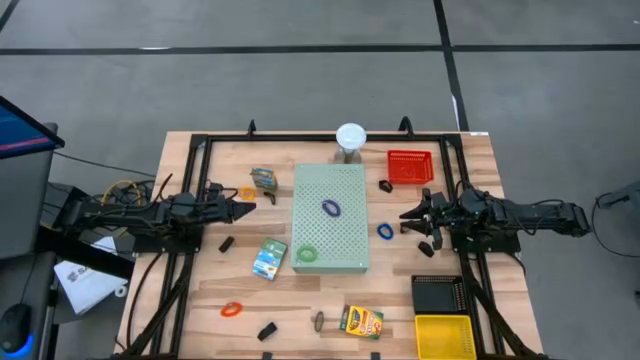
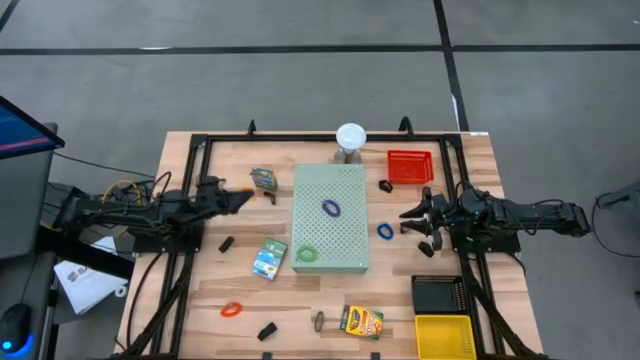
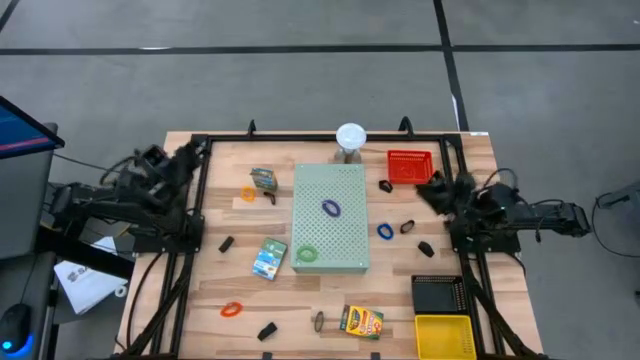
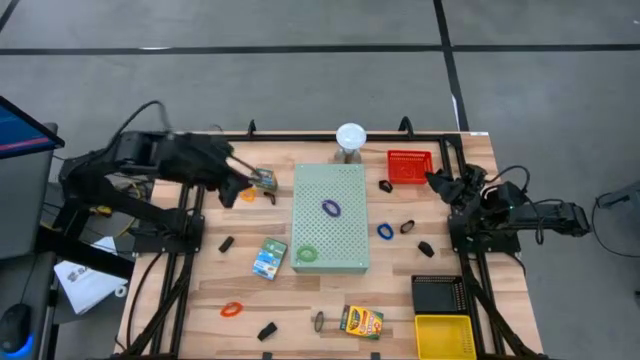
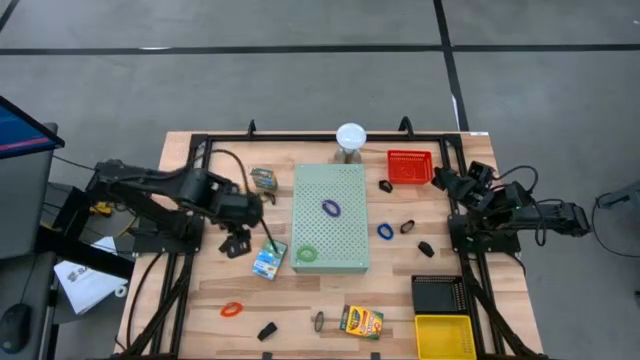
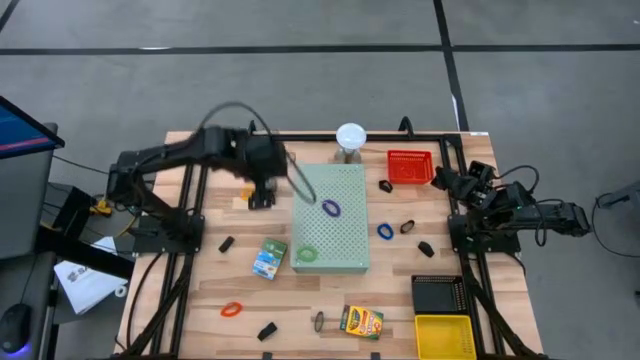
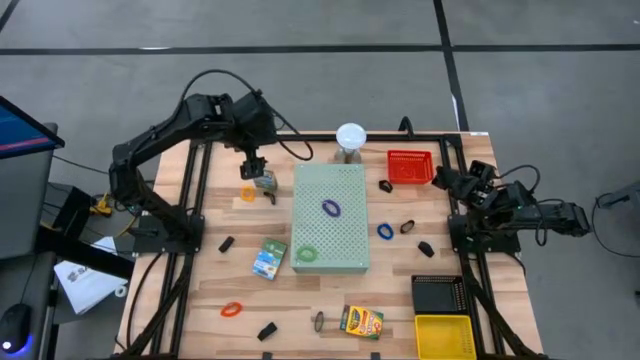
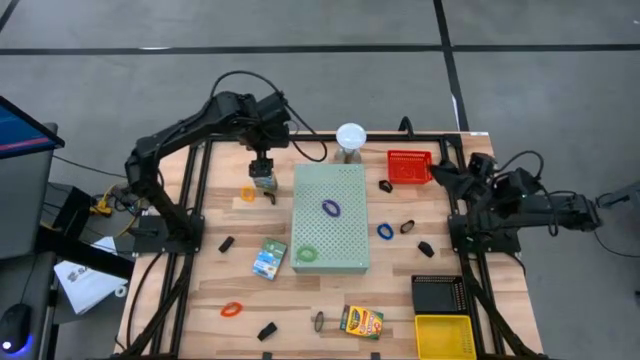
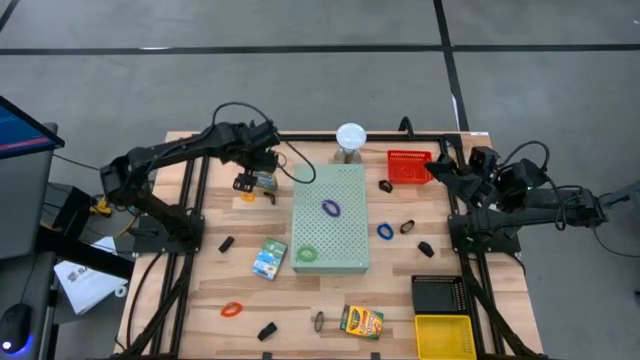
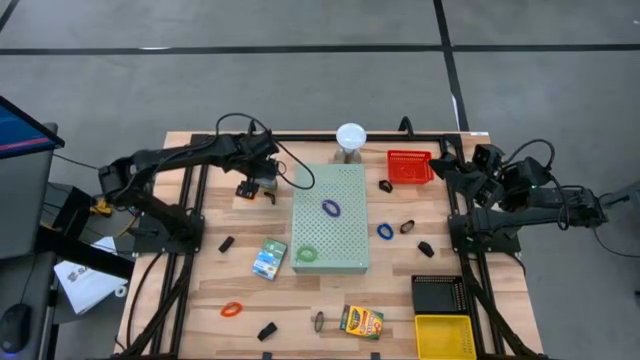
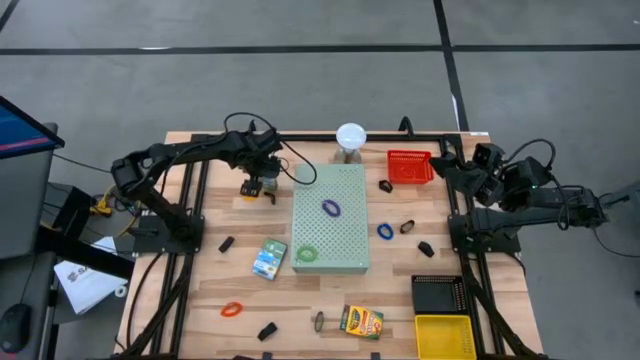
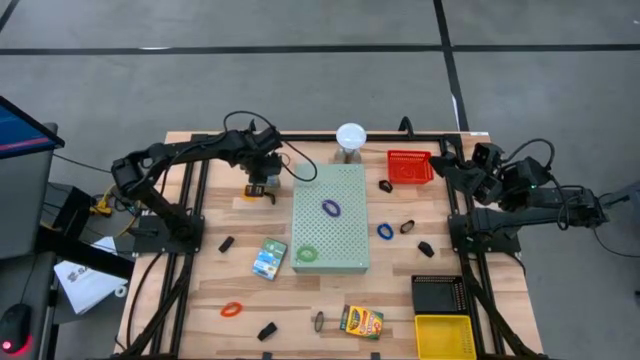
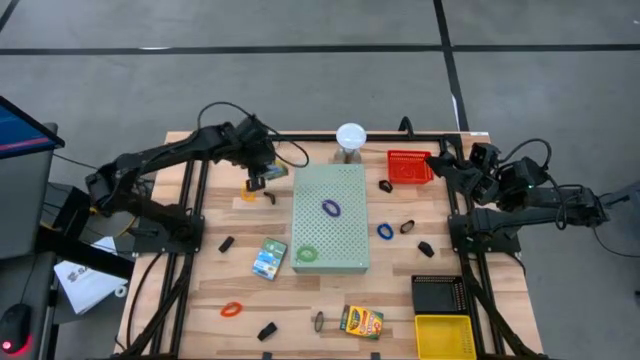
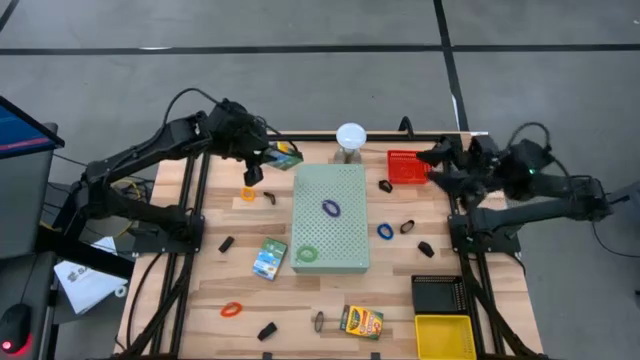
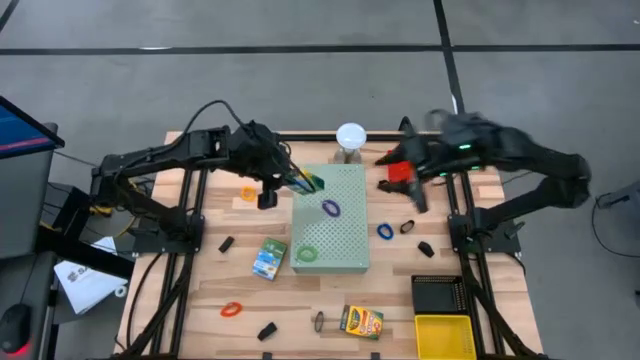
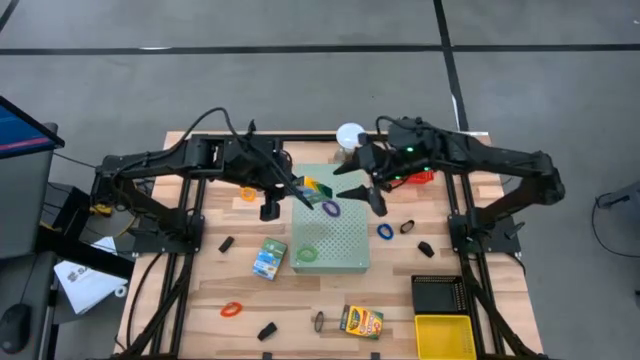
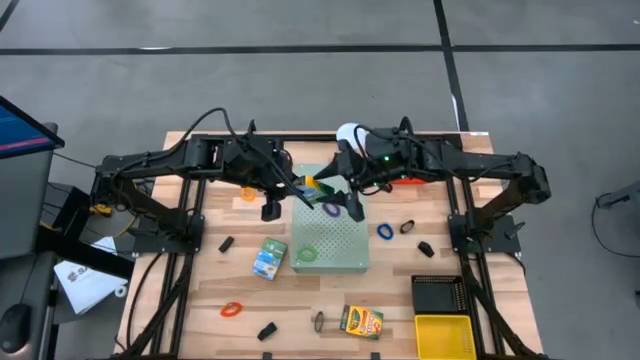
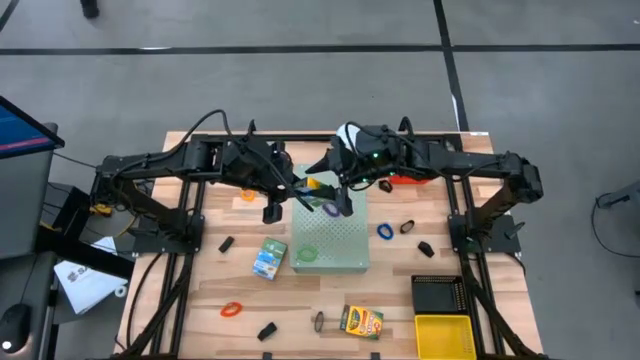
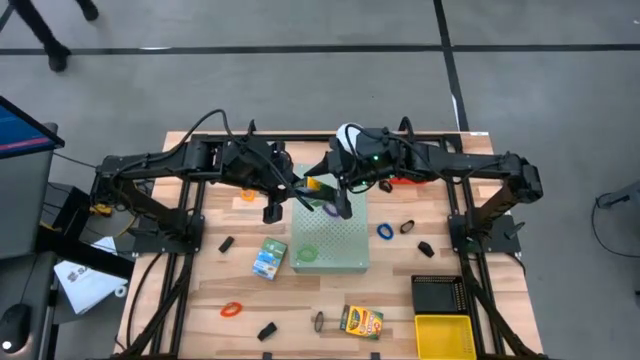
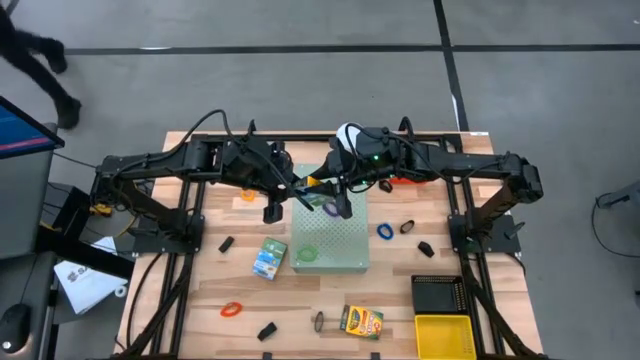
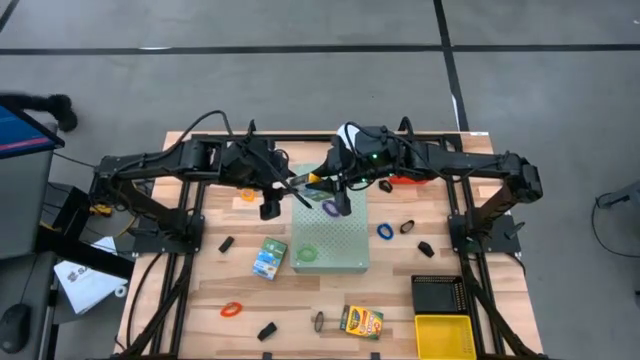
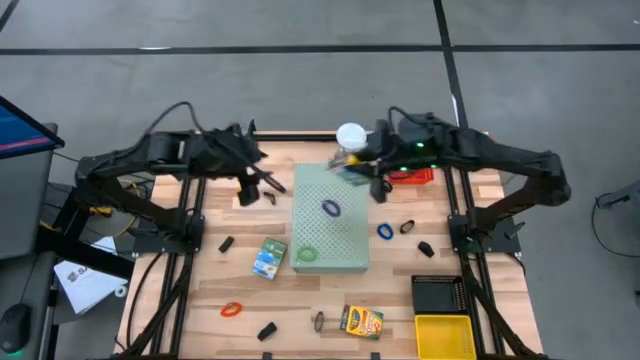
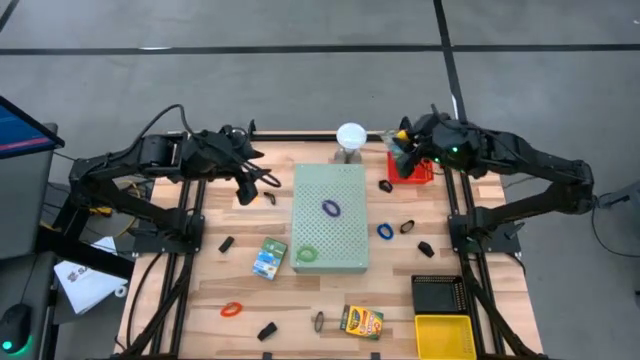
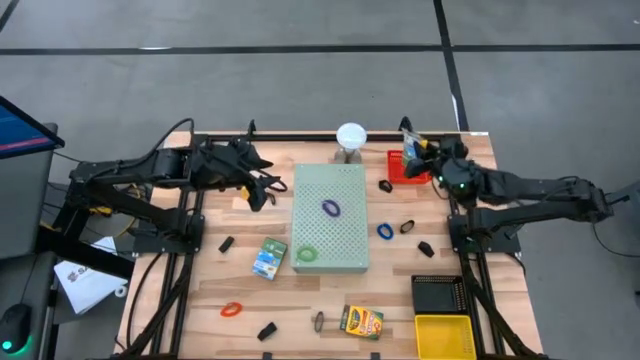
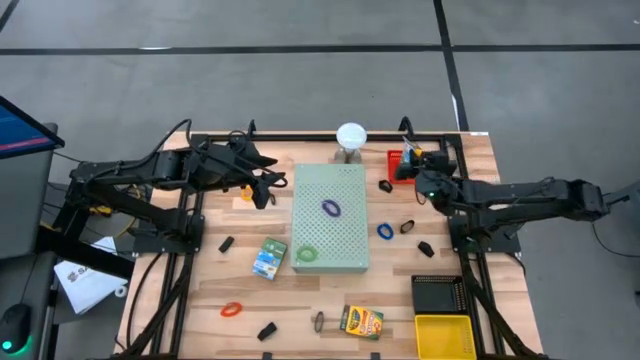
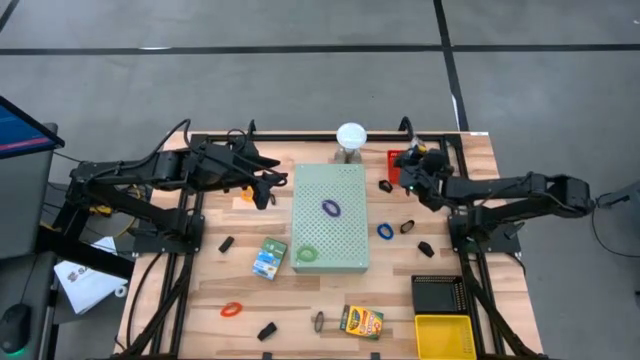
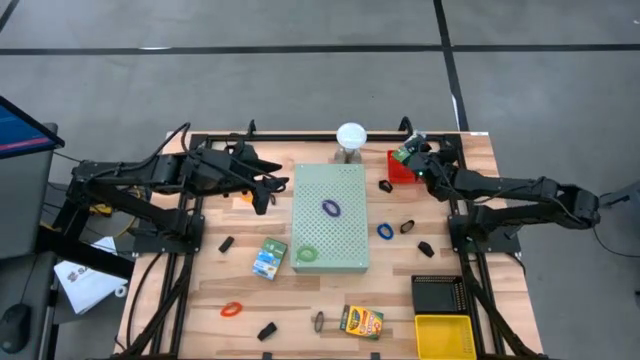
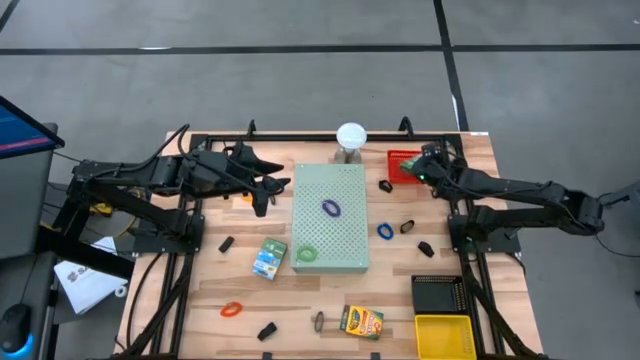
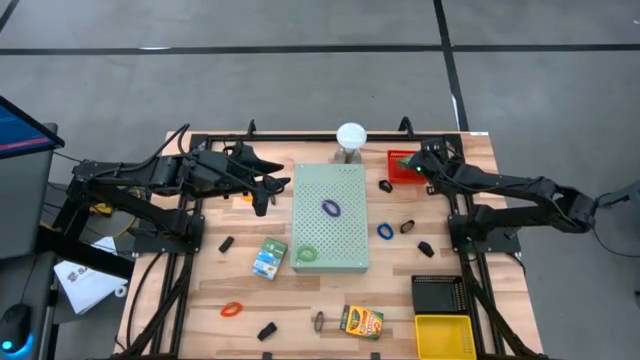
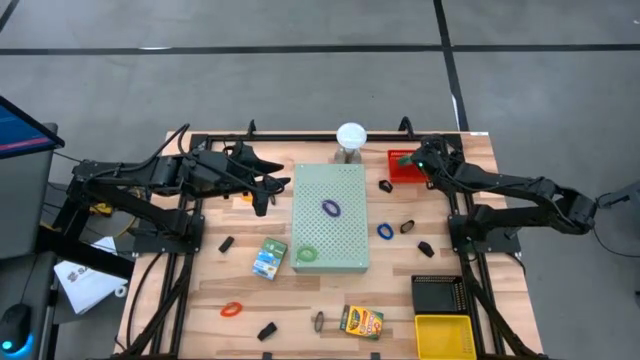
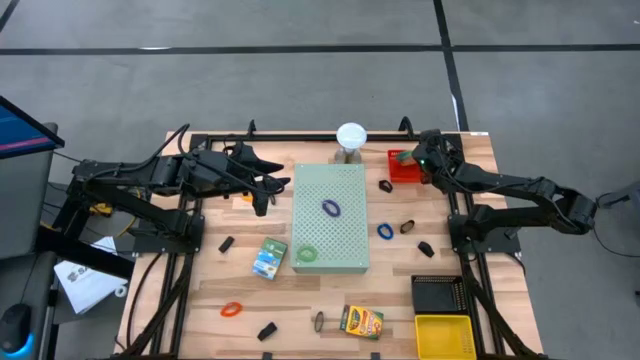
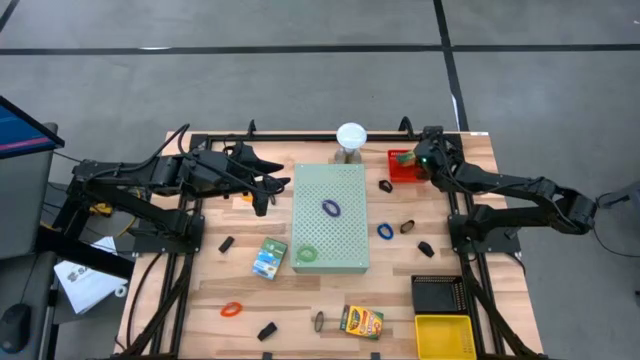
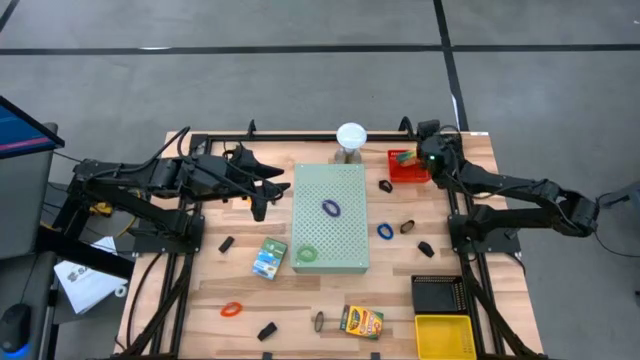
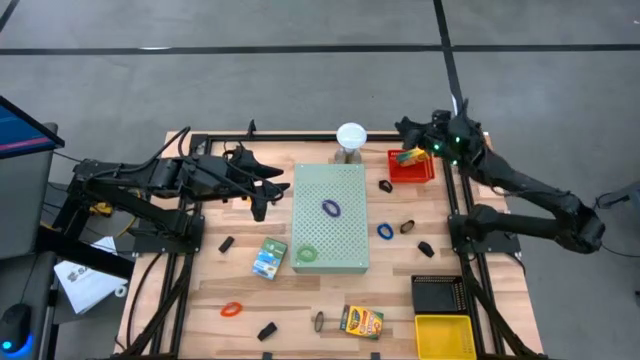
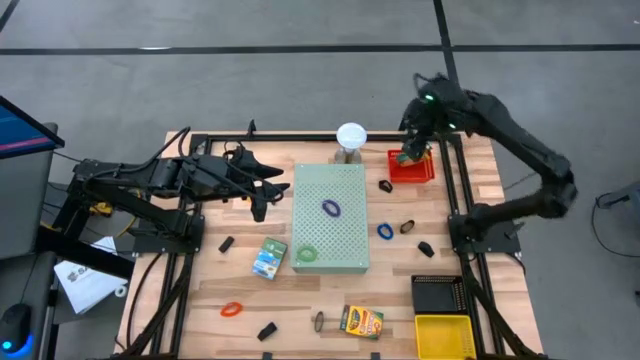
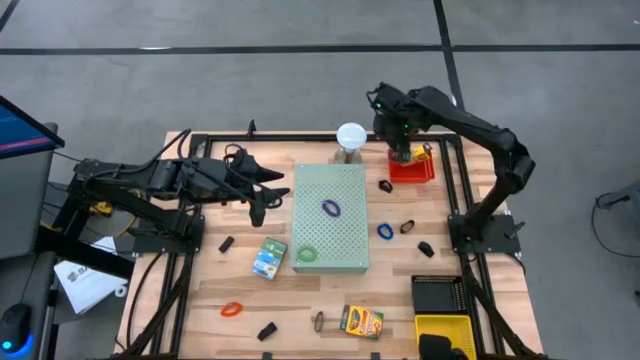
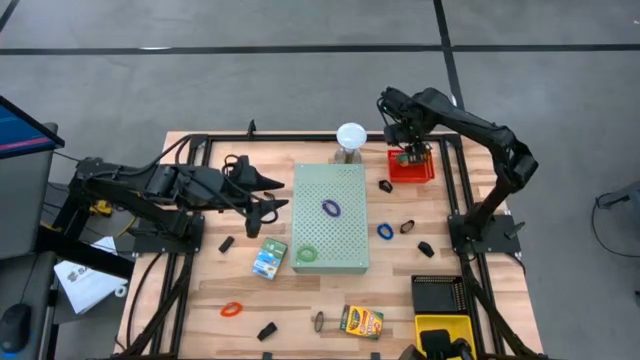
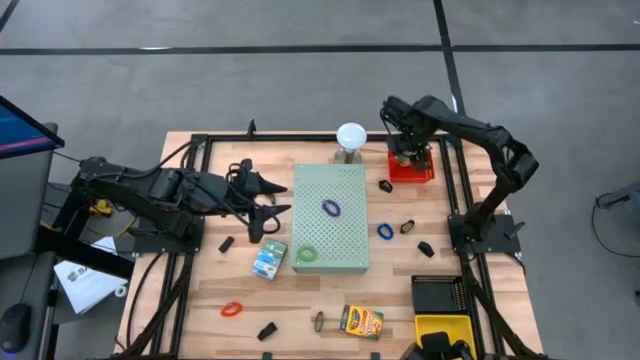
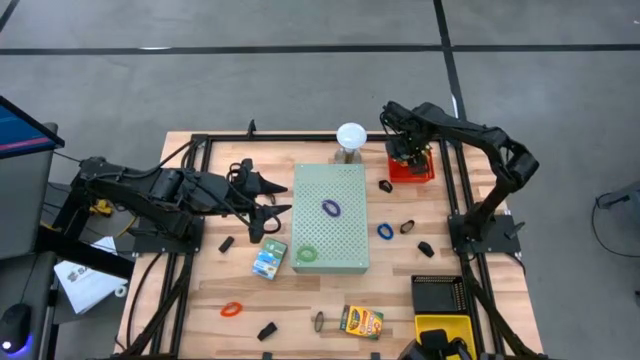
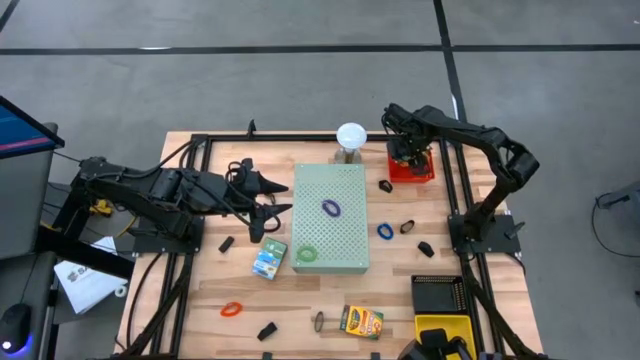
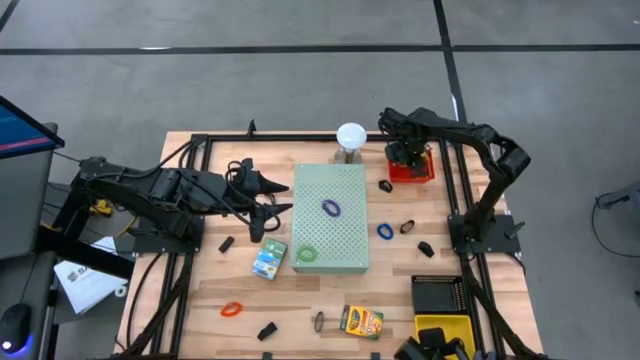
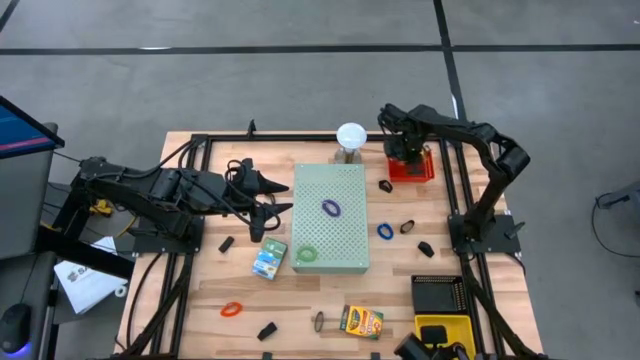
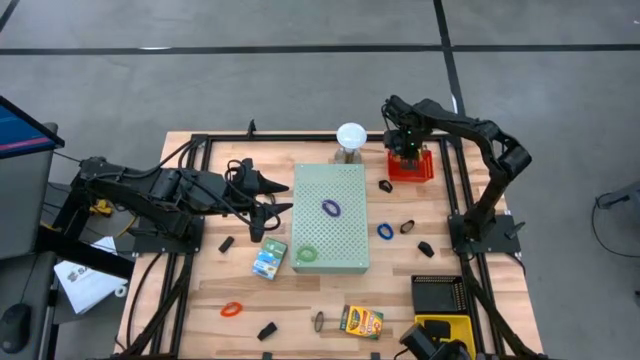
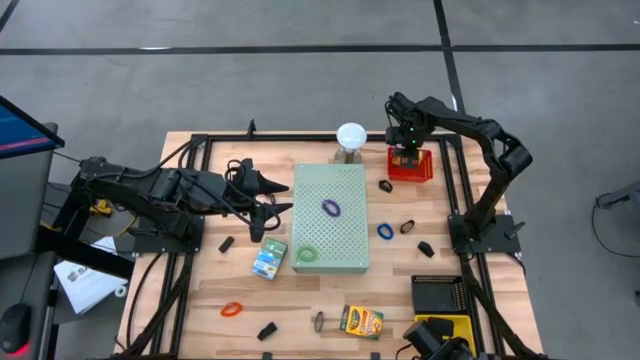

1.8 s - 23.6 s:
Task: Pick & Place Office Desk Supplies
Put the top left yellow crayon box into the red bin
